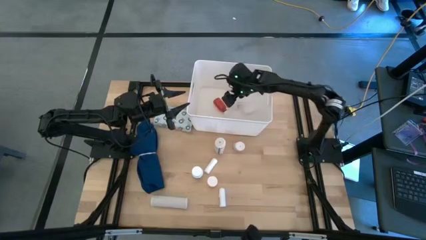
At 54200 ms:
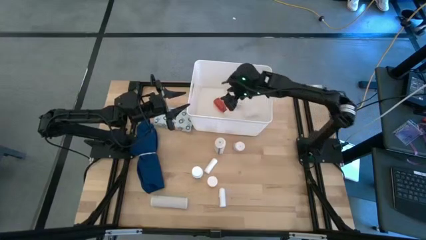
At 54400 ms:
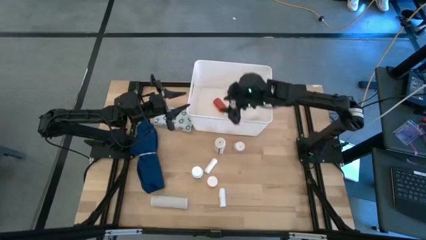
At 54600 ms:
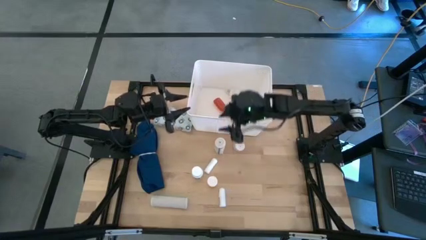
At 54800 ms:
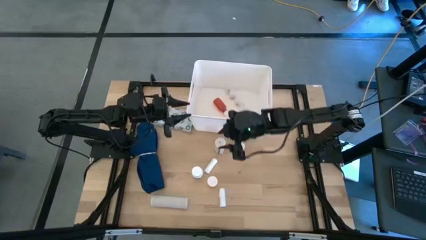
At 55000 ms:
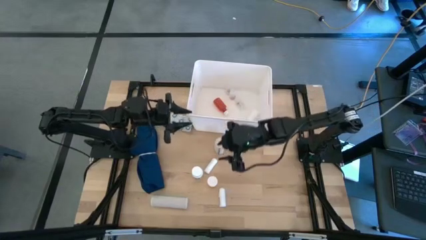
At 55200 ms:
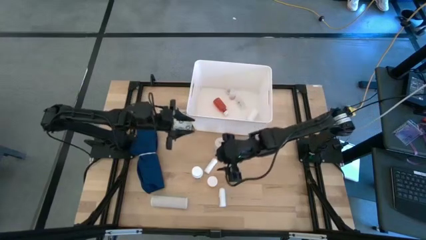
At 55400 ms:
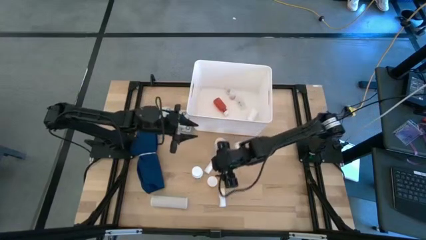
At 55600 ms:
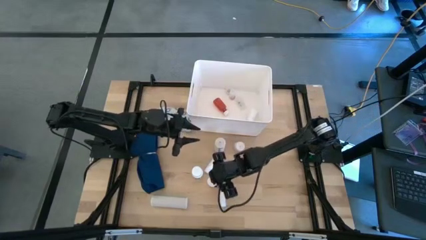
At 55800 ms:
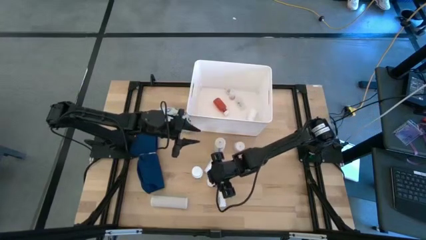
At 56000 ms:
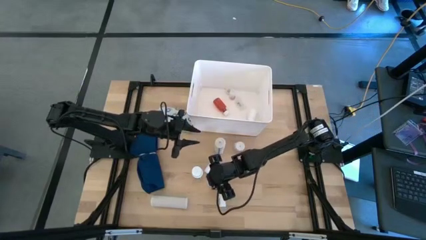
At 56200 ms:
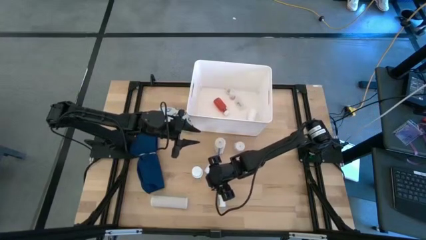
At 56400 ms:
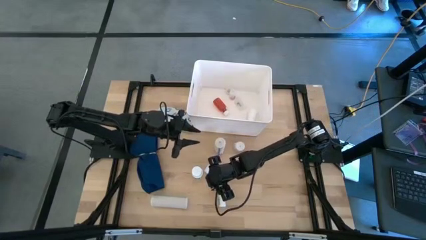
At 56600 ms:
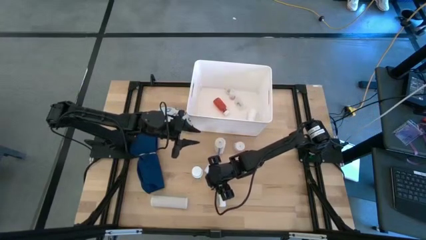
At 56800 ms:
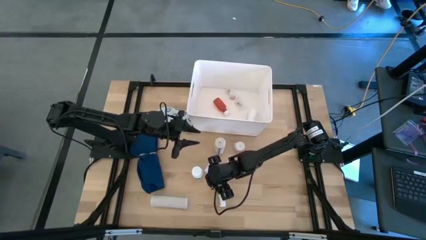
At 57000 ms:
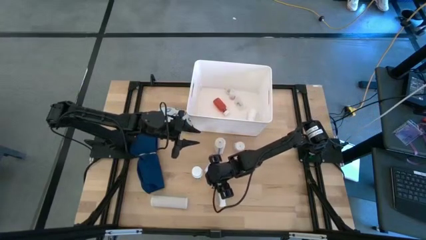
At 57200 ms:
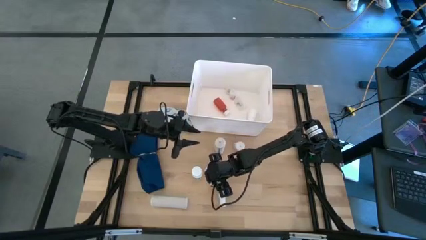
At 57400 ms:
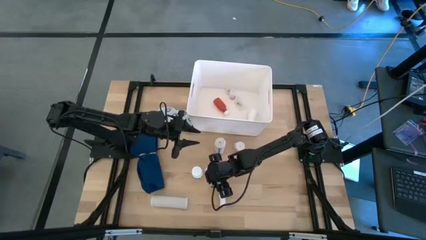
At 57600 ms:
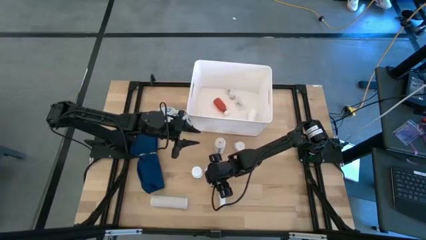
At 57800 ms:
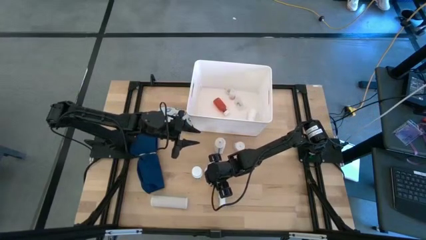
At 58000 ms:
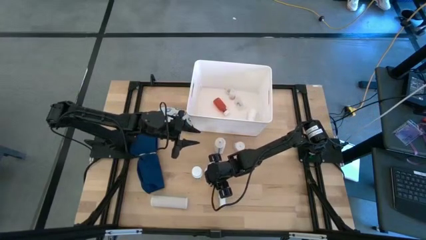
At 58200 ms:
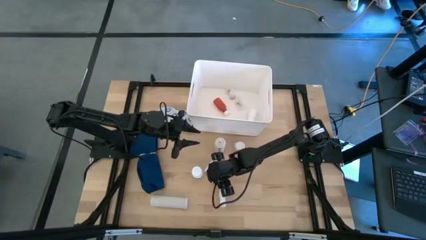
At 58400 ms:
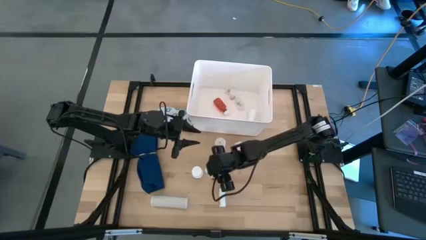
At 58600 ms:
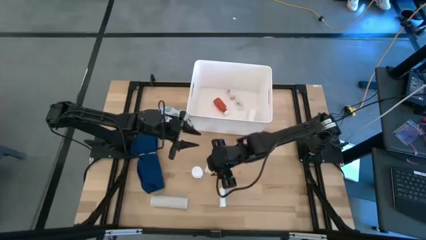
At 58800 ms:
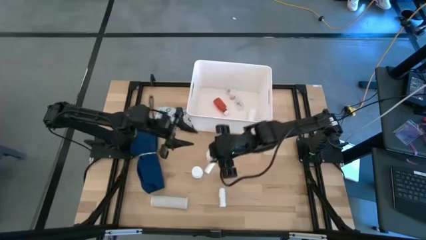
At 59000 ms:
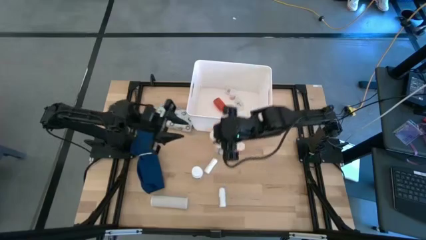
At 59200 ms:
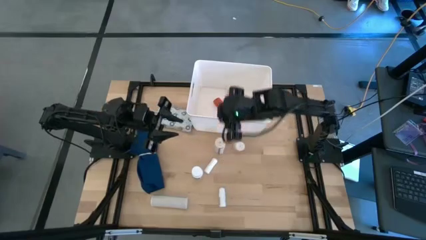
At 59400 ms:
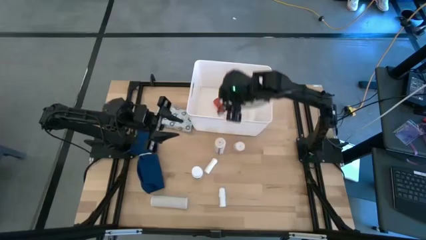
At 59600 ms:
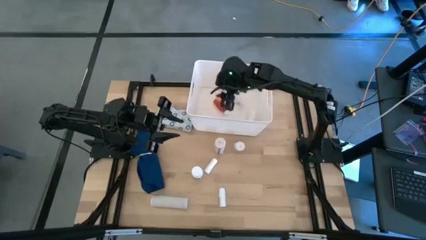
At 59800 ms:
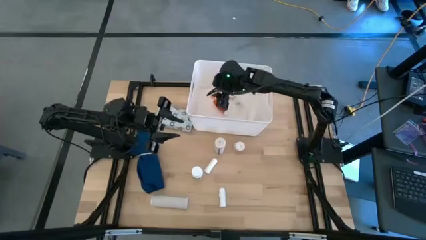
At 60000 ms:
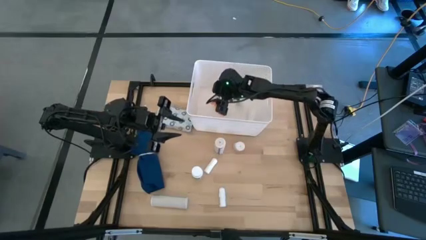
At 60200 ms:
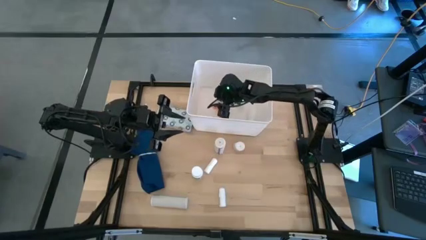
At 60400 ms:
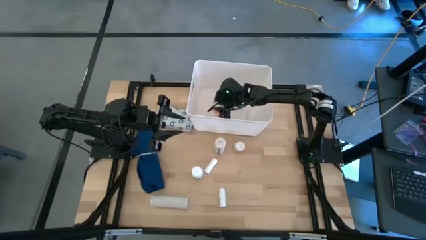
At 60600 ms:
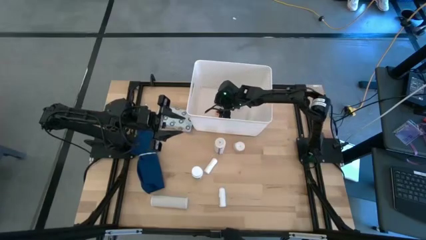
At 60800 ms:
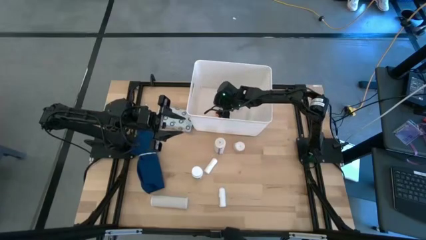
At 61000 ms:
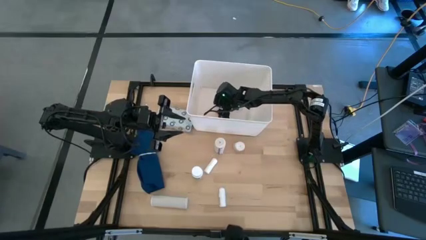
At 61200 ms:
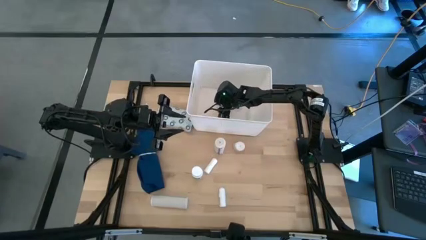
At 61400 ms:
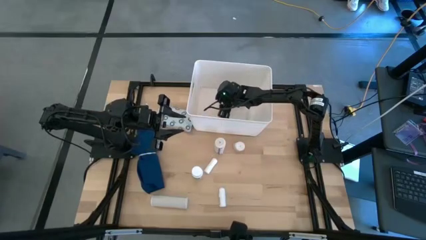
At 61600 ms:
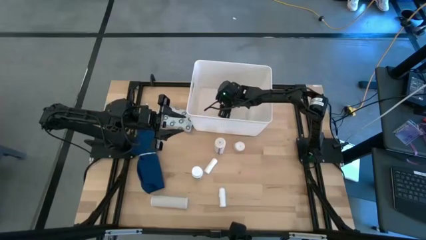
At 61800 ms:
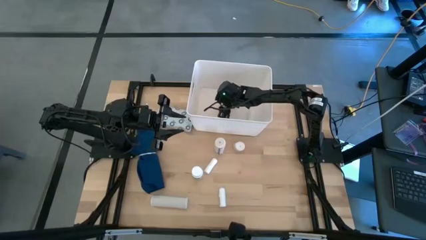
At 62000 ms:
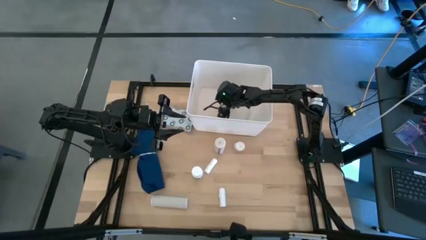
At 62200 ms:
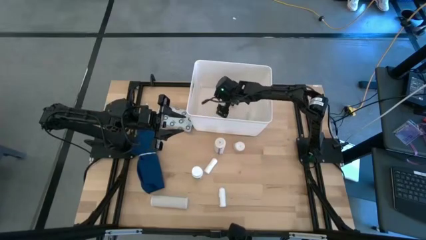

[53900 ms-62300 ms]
Task: Pick & place medical supplies in basket/bin
Put the yellow pill bottle in the white bin

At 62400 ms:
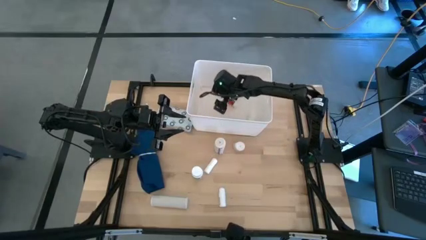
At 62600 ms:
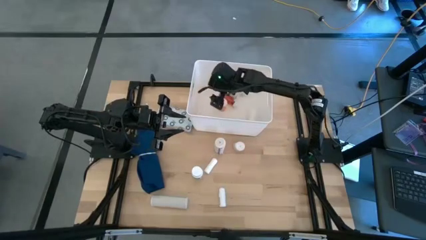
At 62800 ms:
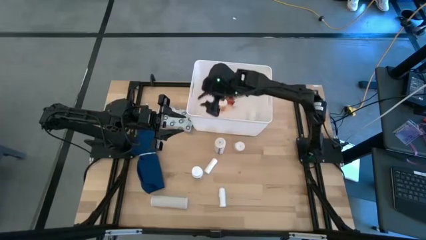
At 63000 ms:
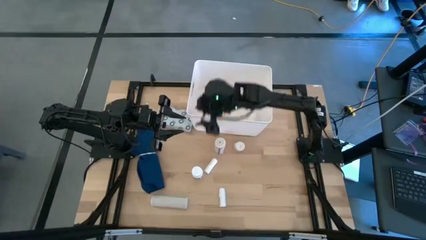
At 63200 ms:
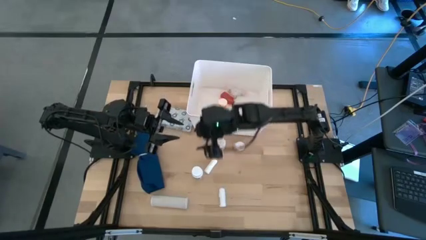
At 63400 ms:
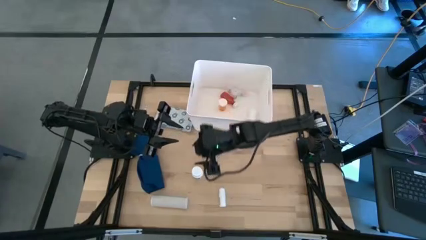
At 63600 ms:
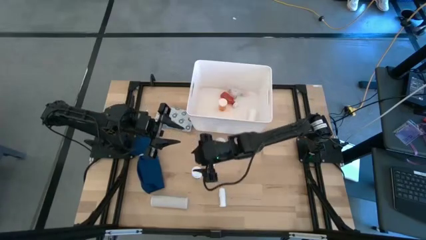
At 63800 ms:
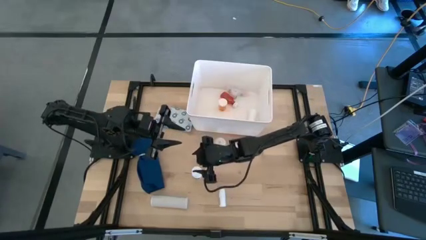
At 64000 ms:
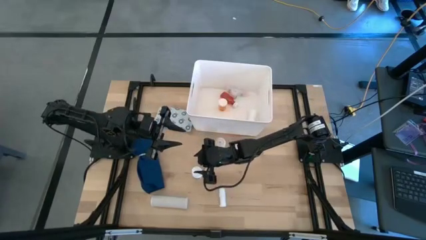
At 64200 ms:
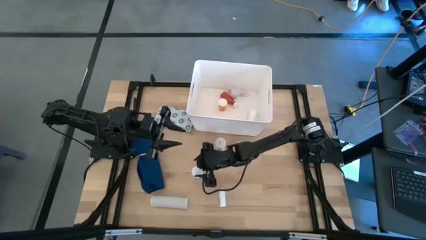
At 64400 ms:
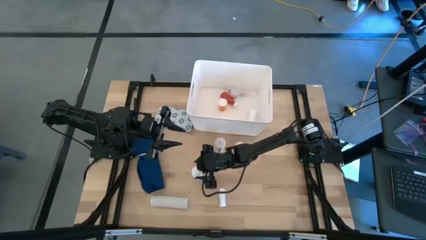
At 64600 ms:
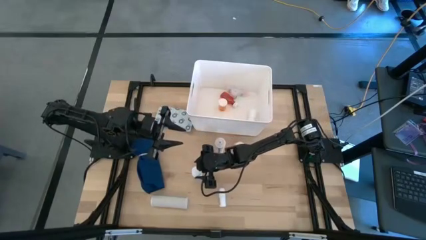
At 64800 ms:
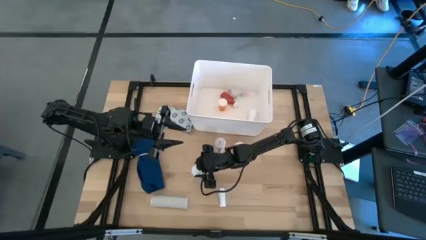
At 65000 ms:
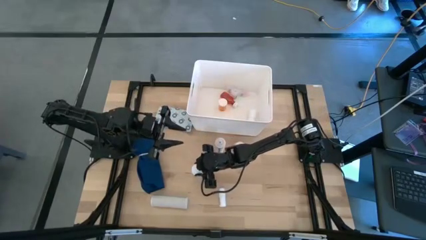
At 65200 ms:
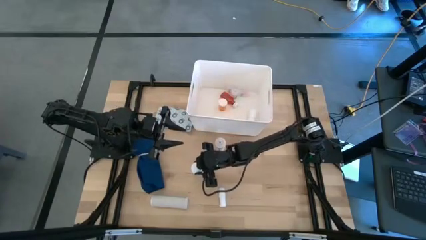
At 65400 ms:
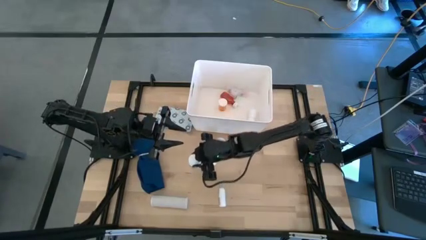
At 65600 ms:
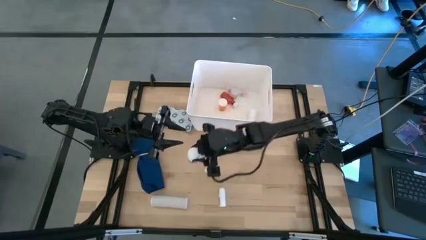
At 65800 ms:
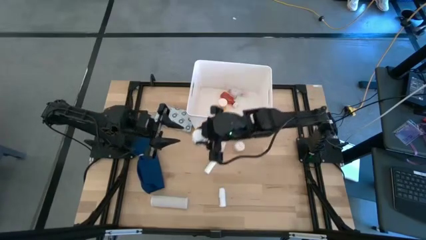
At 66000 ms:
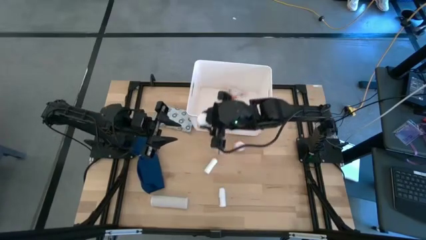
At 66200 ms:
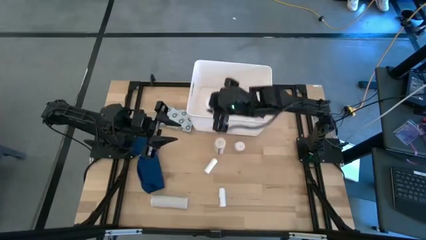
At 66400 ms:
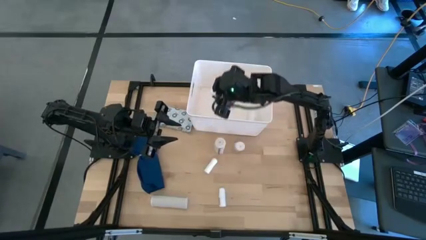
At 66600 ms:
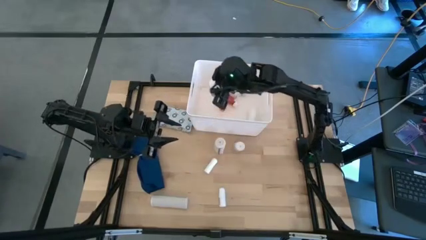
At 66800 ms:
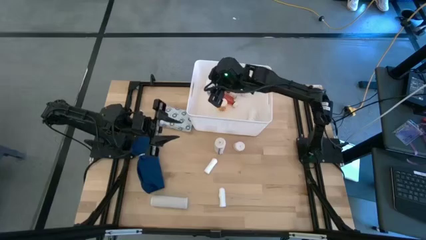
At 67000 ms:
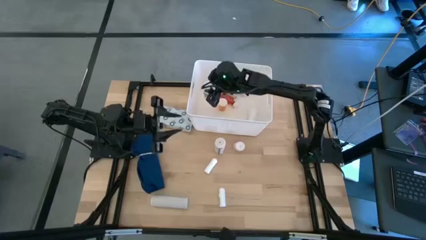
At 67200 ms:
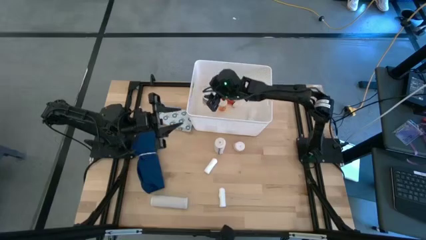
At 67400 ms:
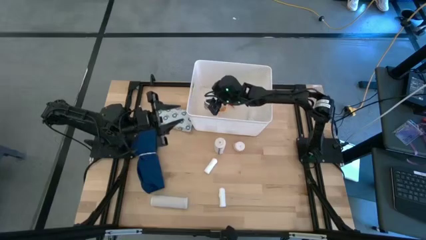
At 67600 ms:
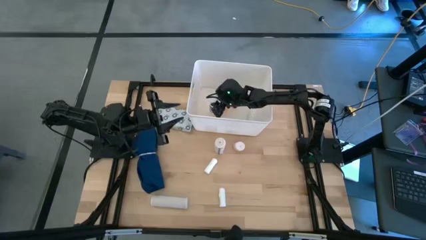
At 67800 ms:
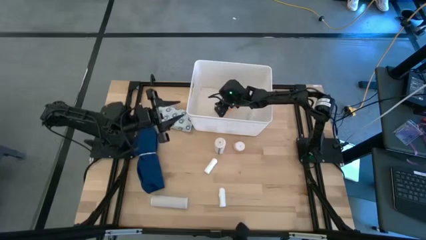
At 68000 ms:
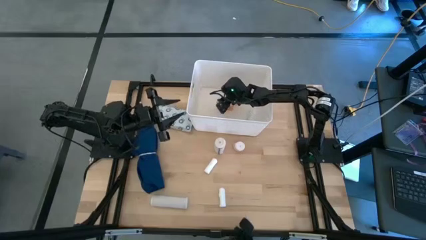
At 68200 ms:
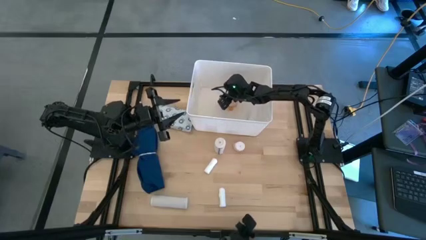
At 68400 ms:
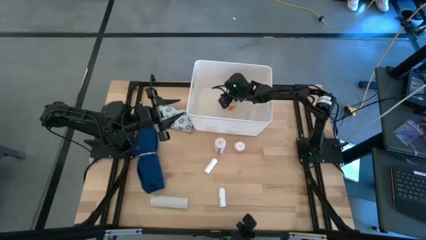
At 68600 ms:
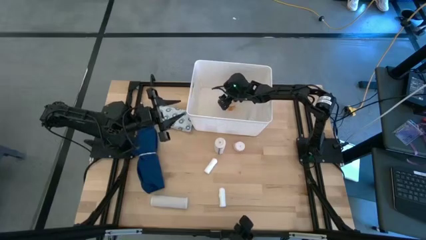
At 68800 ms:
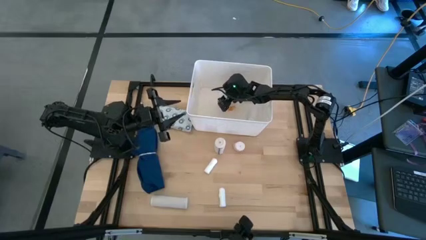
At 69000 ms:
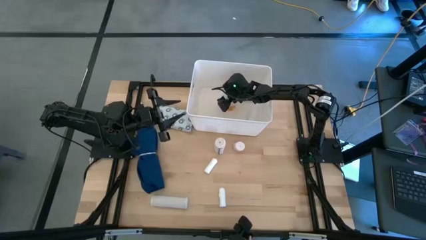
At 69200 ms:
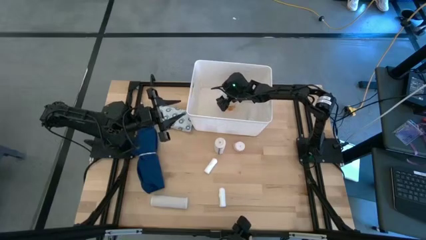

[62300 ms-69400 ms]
Put the white pill bottle in the white bin

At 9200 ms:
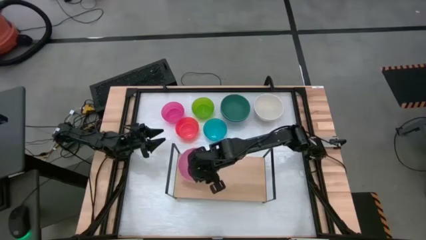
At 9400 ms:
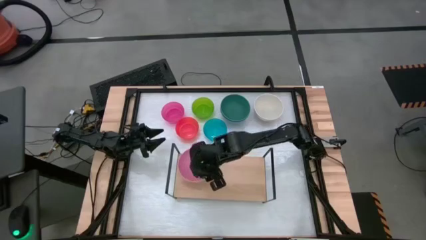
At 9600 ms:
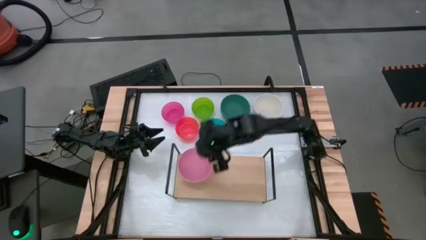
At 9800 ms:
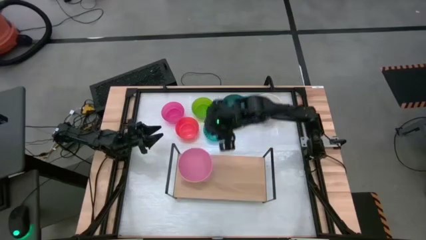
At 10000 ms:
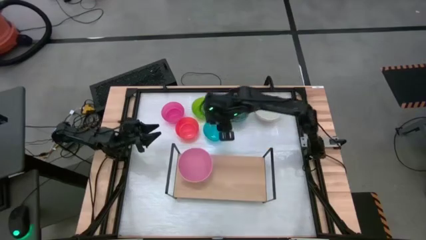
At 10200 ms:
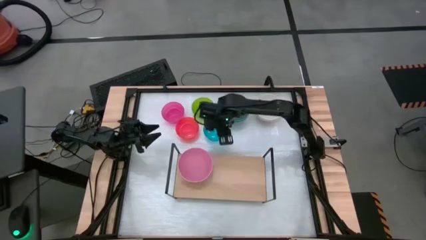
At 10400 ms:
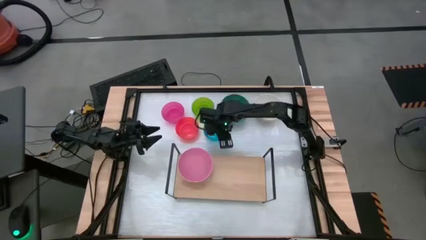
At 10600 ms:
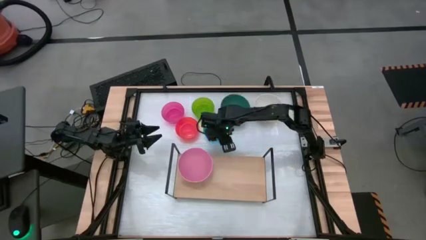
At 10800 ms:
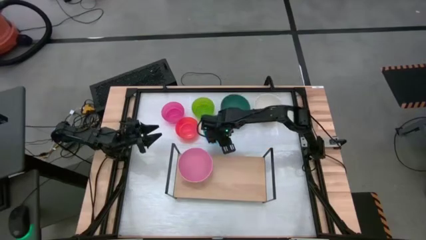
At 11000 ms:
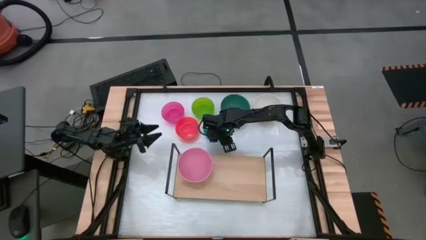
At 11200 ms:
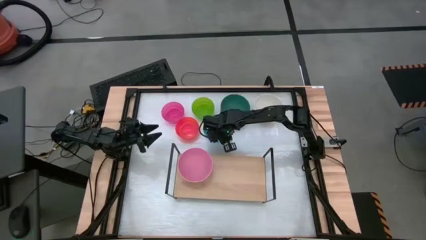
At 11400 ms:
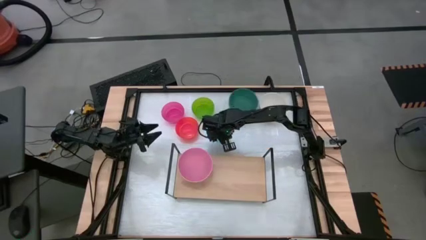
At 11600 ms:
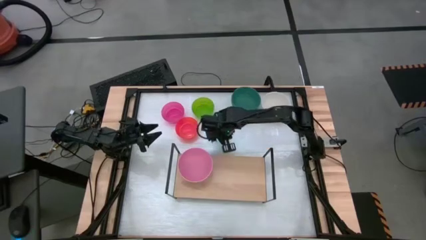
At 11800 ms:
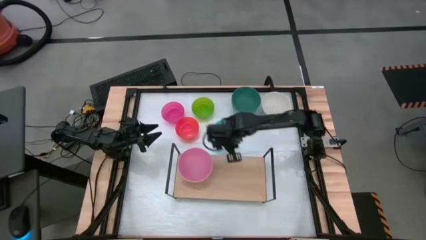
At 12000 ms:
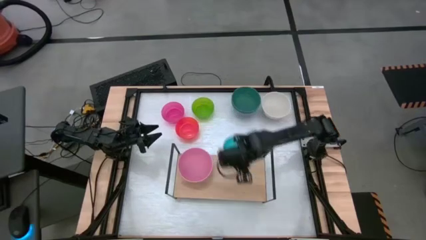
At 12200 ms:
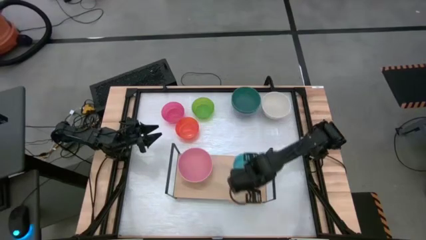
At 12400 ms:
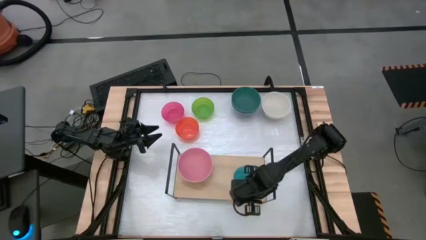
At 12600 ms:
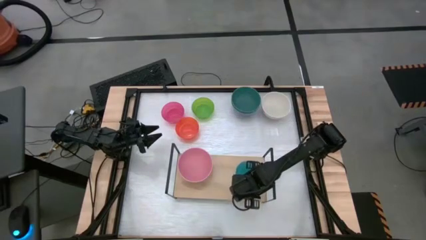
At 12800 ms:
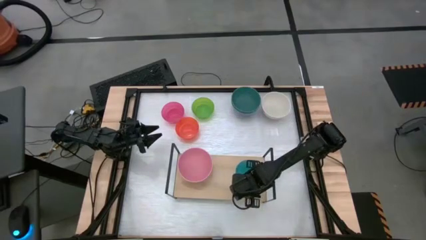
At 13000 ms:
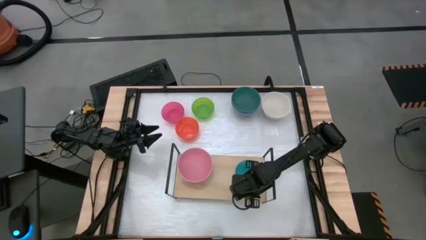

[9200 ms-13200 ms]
Task: Place and stack bowls onto a shelf
Put the small blue bowl on the shelf
